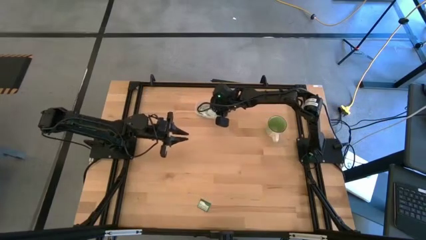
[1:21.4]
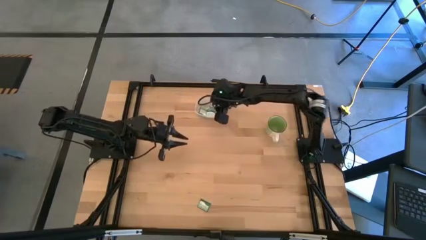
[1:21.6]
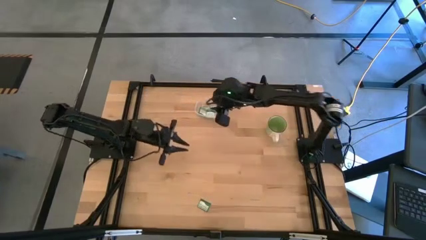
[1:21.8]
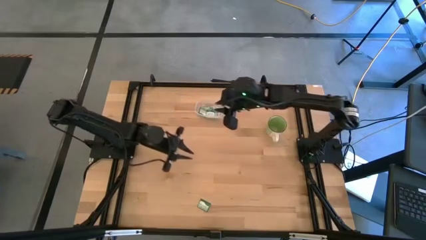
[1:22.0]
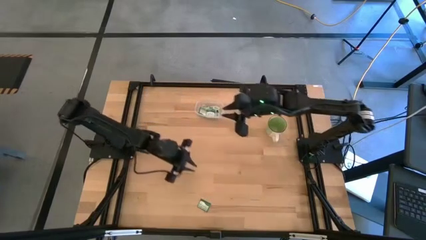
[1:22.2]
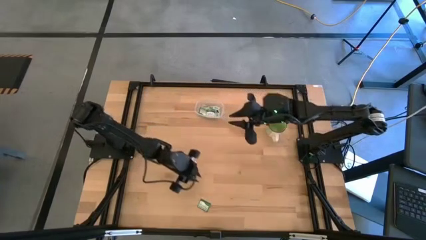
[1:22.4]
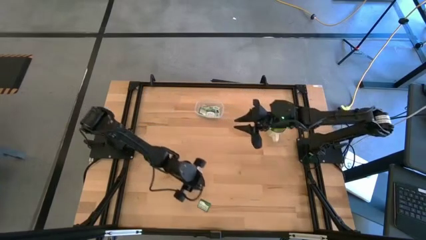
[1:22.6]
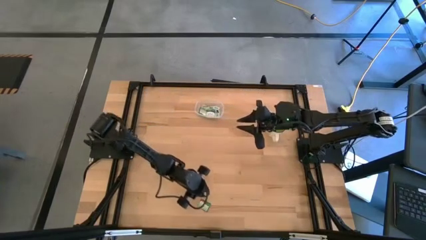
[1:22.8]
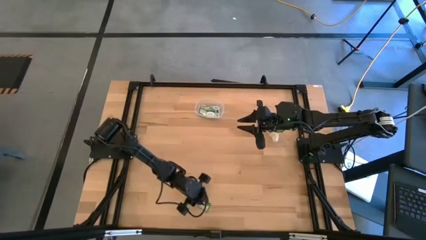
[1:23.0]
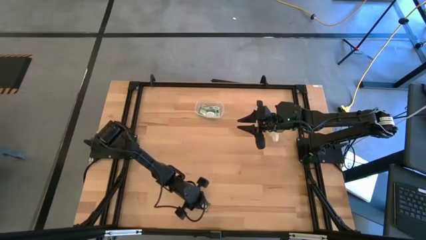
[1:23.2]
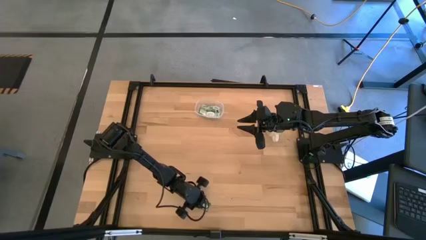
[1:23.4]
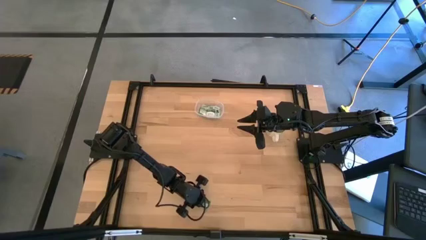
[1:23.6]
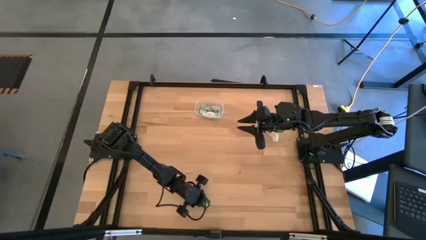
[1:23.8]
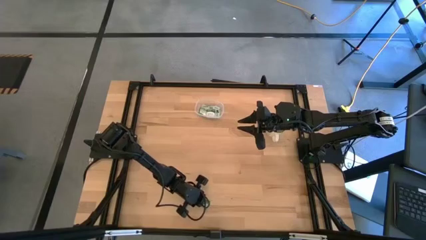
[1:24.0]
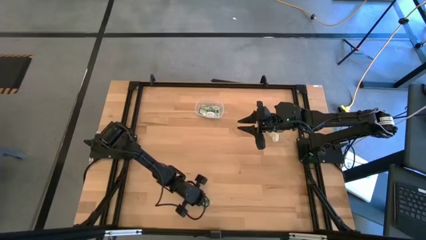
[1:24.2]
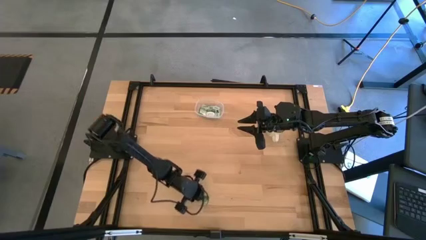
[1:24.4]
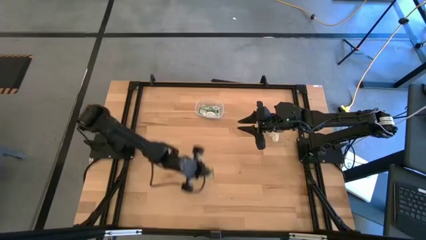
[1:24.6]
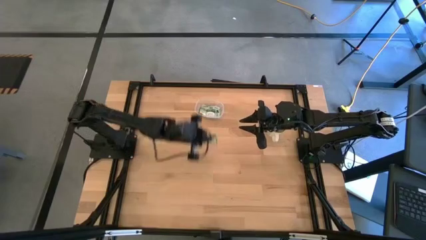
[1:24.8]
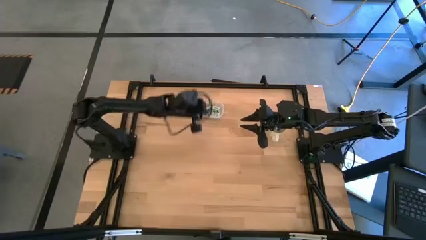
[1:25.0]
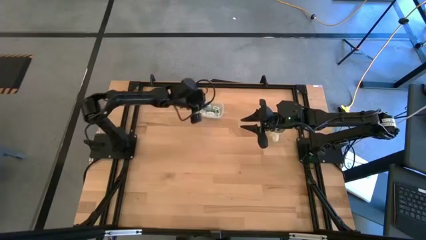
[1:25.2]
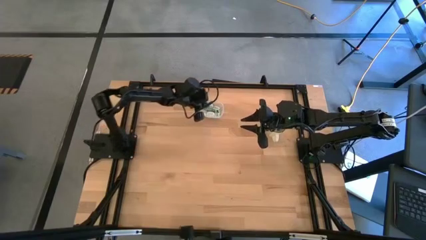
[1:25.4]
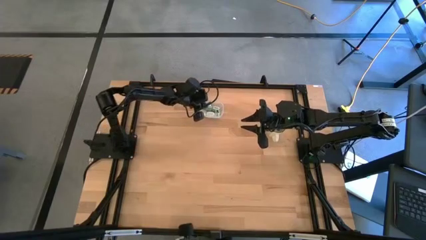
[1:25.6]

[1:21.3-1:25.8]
Task: Pick and place items into bin
Put the white stevia packet into the bin

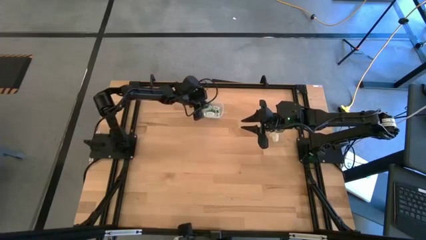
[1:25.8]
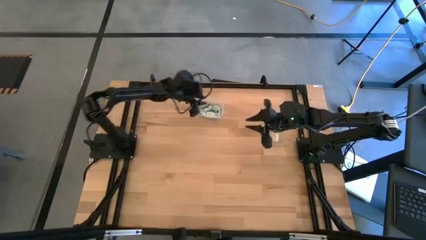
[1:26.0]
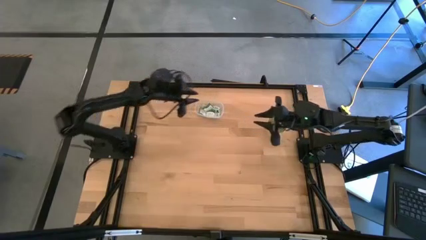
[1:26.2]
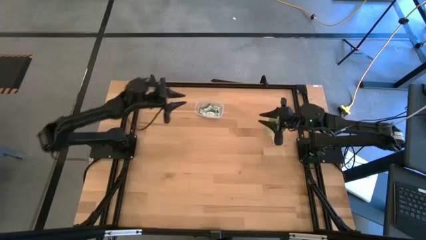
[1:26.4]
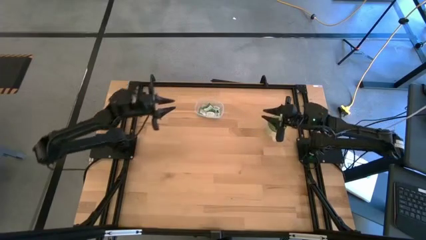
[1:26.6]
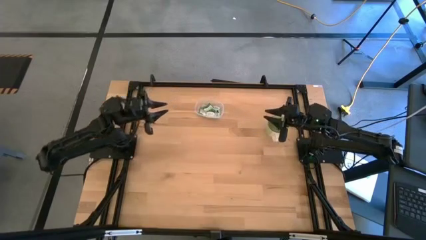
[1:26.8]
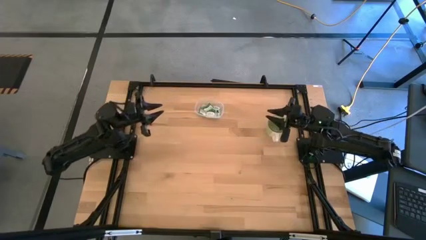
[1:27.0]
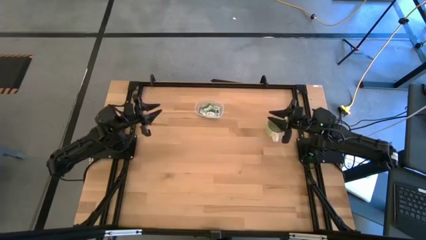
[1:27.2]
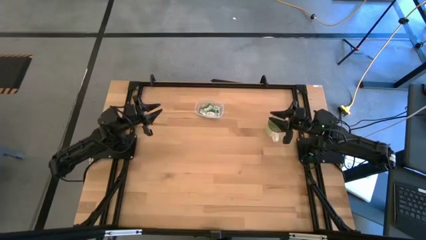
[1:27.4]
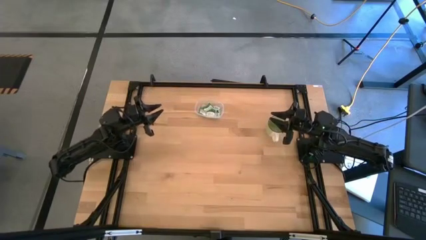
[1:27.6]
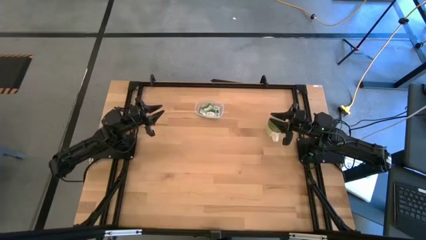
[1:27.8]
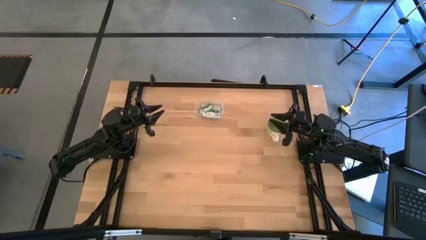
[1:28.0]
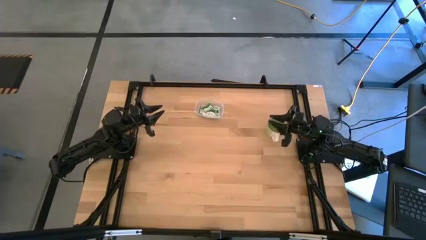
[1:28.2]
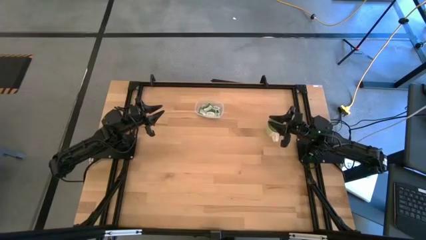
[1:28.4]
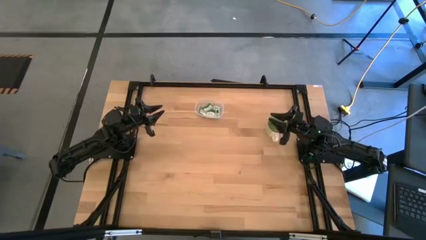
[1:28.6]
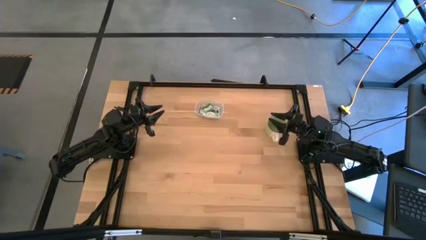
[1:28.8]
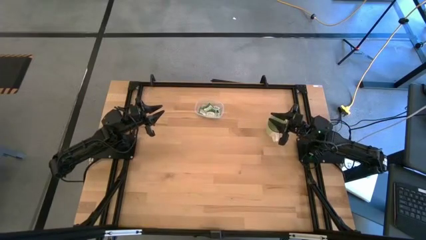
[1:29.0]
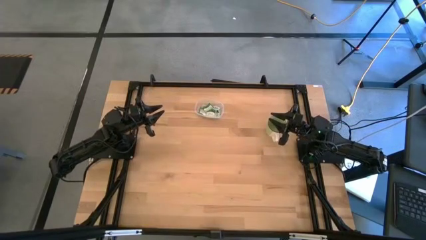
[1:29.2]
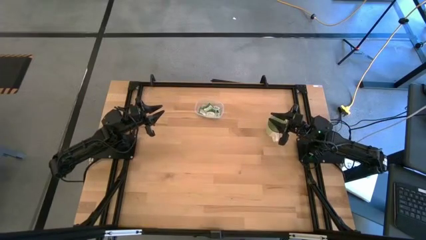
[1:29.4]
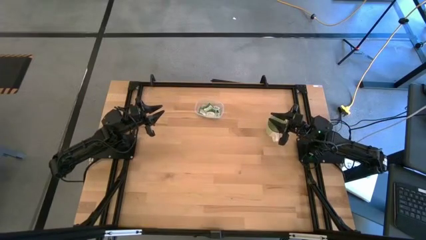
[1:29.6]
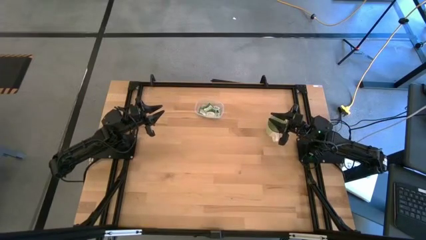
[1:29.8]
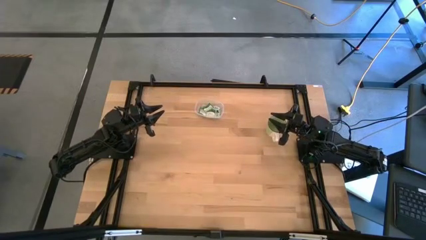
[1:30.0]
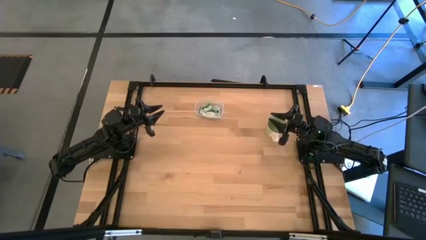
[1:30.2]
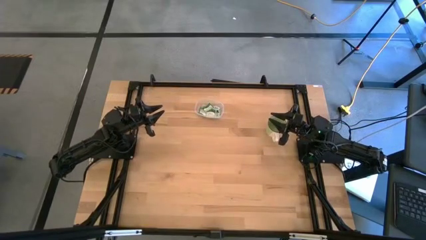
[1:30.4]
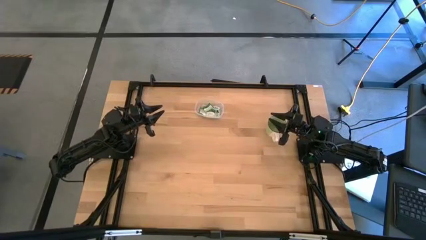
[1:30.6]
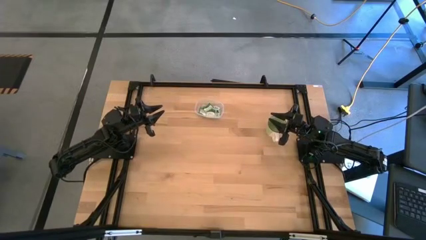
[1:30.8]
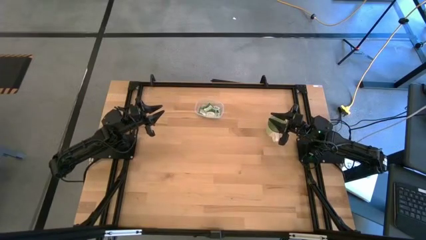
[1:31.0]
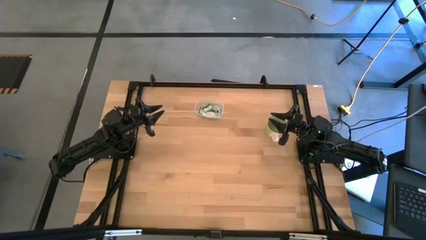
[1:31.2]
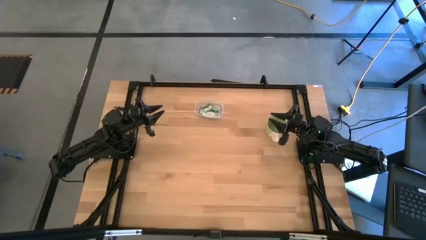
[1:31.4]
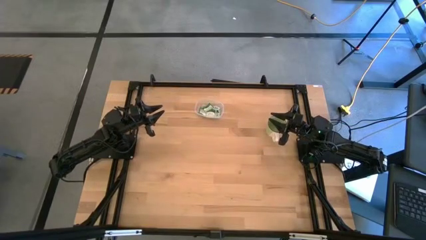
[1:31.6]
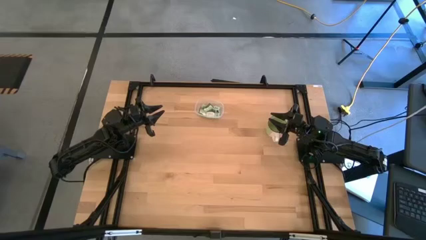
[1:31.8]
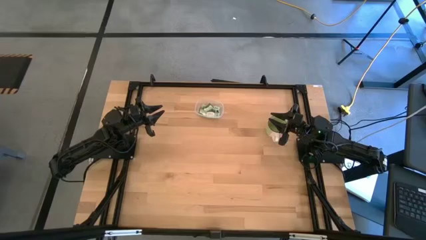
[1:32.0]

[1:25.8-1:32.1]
Return to Home Position

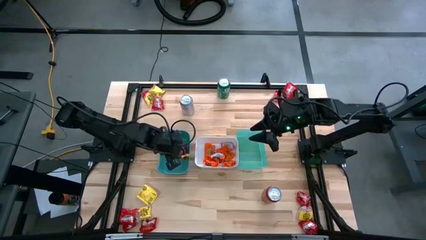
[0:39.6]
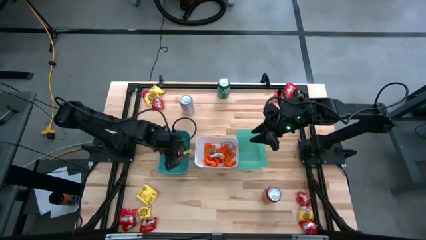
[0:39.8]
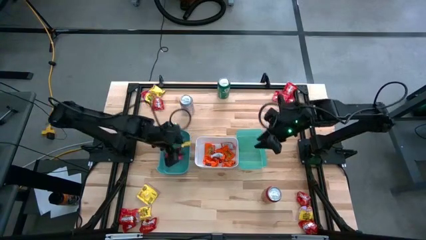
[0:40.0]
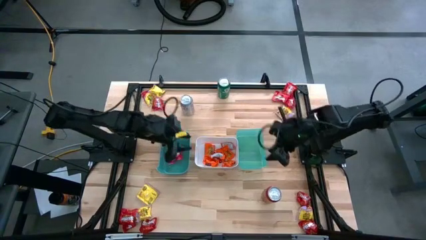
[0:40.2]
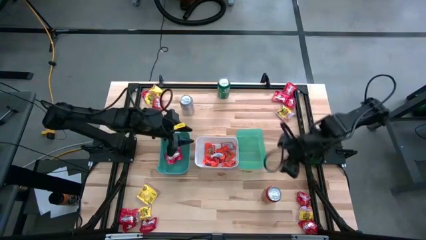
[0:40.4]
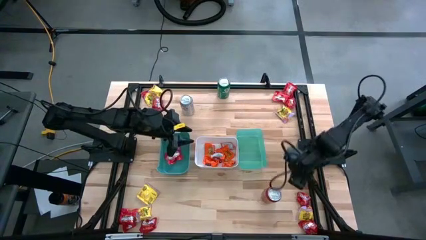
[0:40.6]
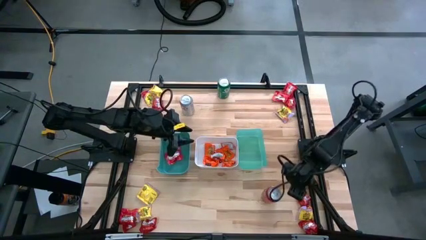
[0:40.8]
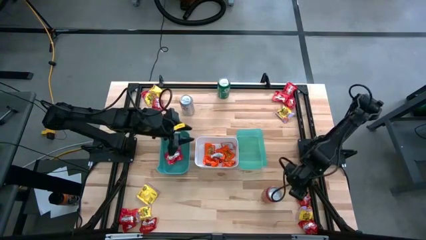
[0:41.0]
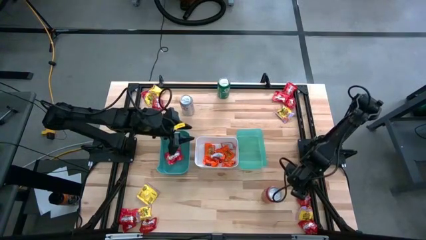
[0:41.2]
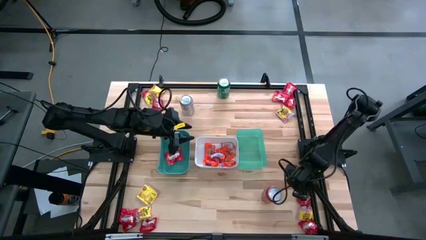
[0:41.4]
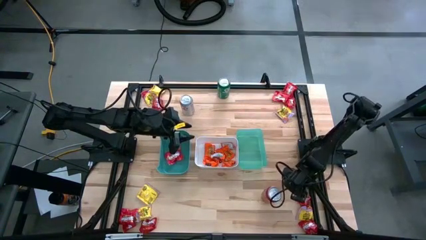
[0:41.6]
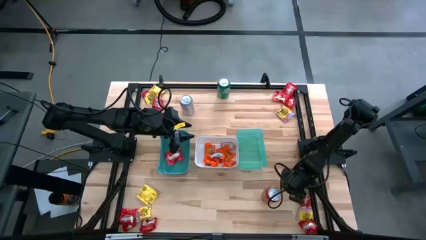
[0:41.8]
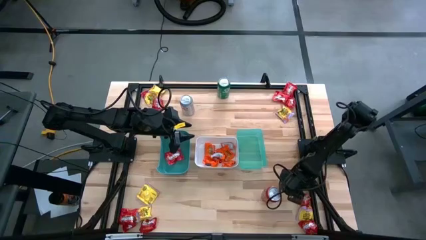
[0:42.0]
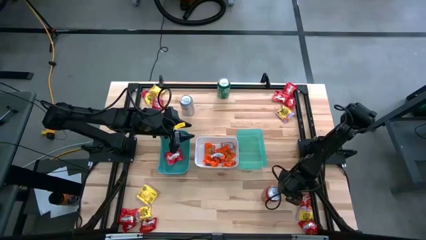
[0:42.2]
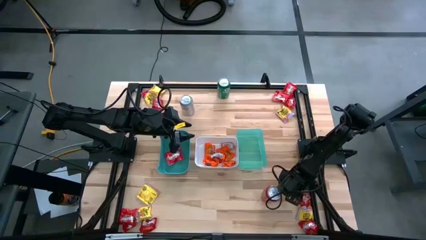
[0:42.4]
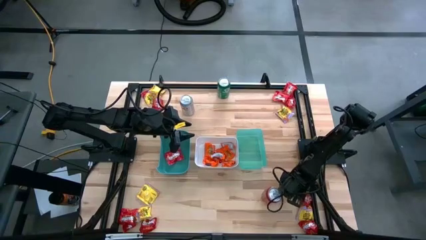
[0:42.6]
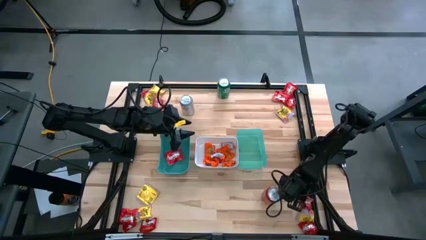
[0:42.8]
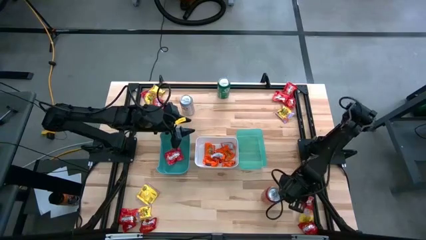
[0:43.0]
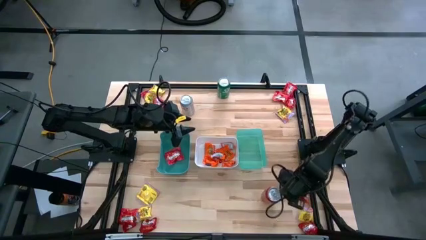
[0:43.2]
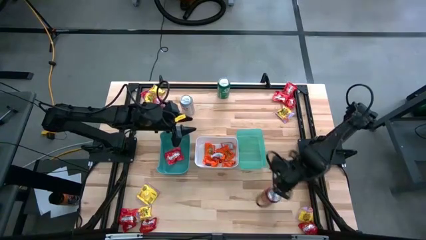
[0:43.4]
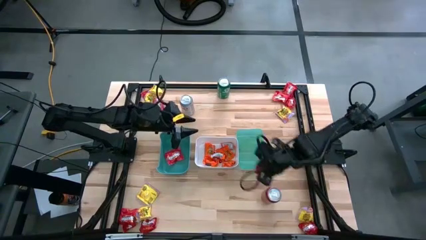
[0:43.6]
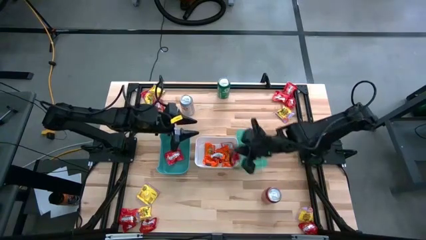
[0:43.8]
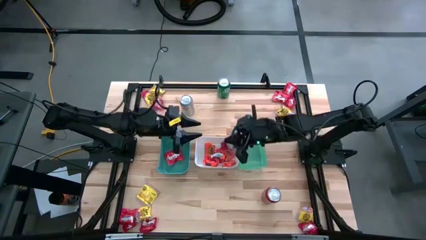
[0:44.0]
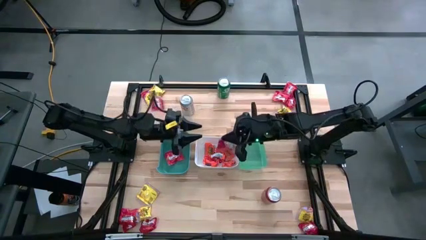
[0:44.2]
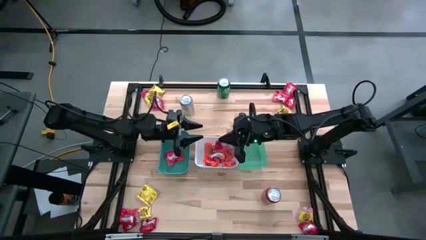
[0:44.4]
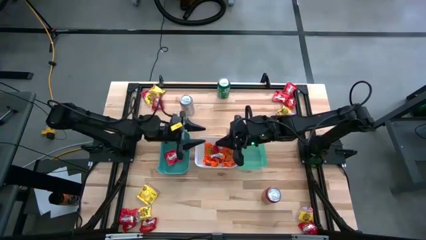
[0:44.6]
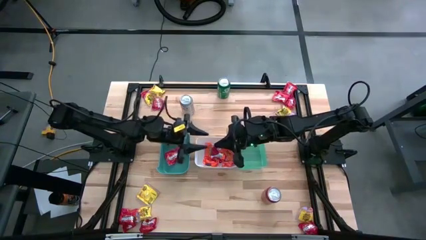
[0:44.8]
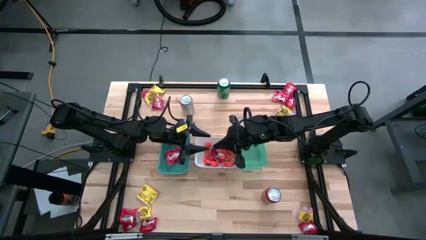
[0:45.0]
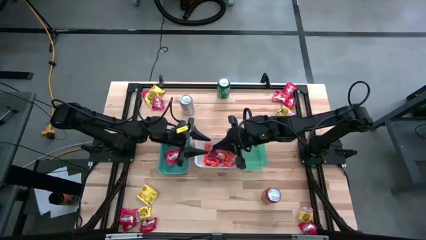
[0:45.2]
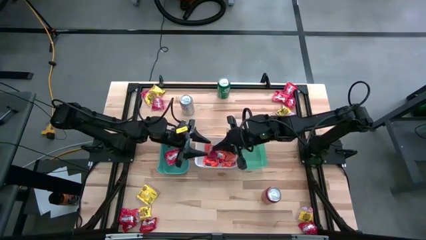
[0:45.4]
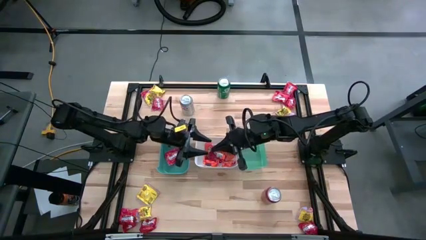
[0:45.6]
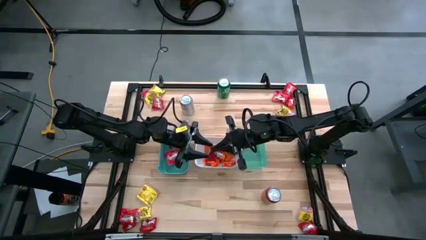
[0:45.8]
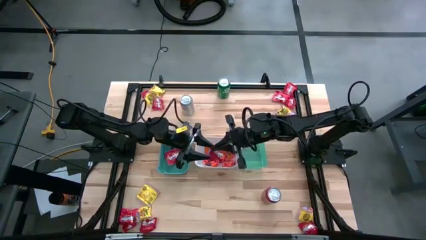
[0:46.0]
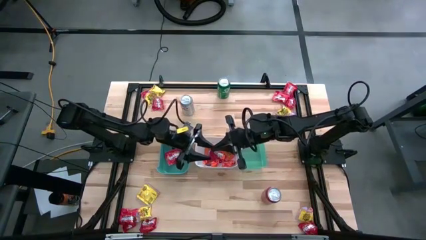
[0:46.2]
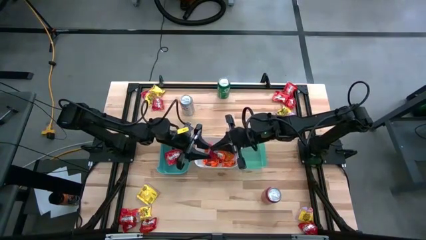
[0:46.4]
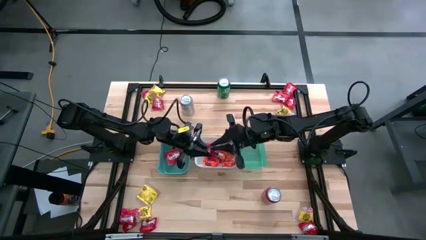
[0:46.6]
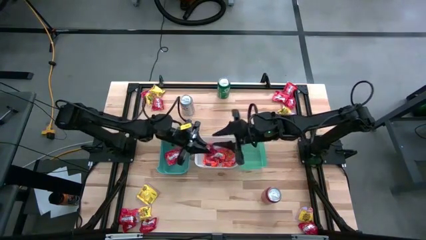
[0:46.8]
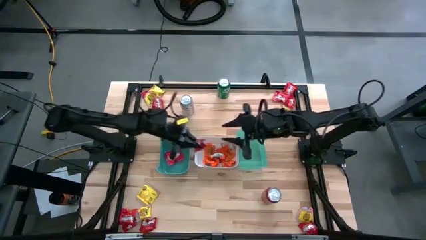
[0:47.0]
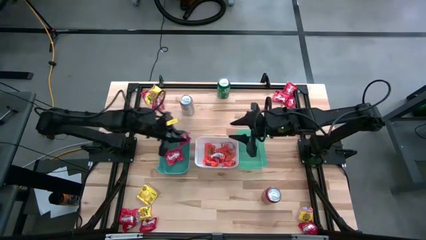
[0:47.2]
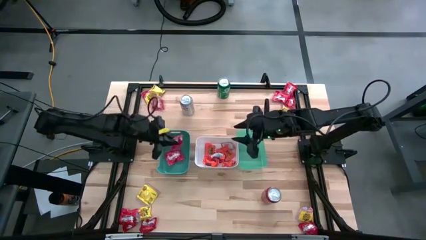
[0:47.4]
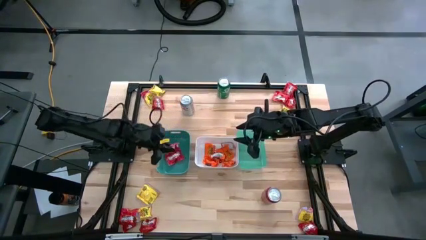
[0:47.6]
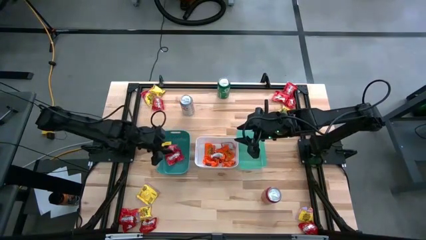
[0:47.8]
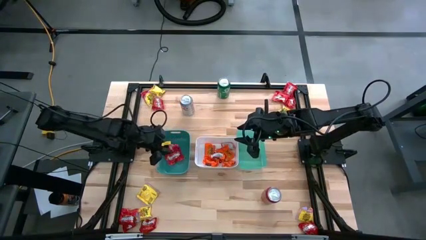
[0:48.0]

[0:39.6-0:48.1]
Task: Sort candy
Put the red candy into the green bin
